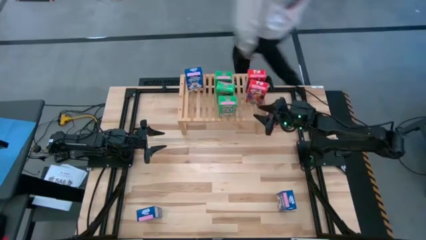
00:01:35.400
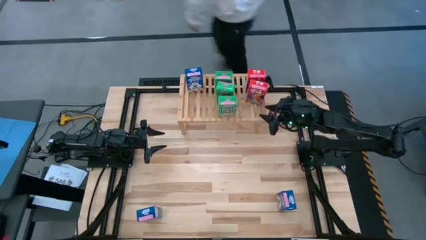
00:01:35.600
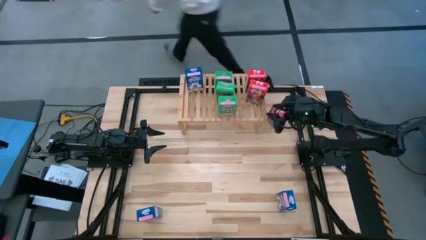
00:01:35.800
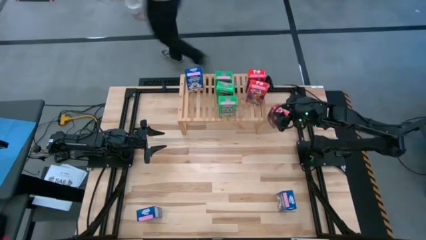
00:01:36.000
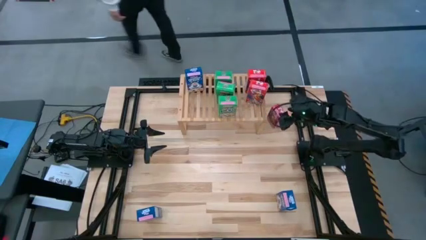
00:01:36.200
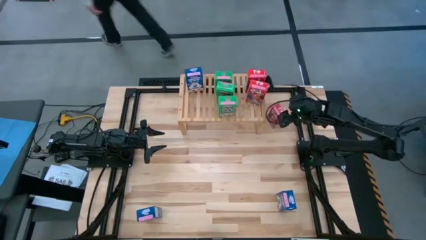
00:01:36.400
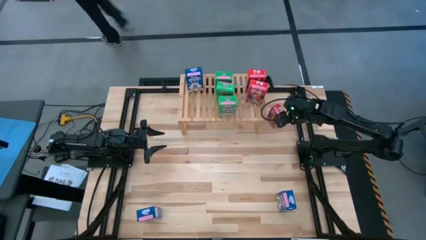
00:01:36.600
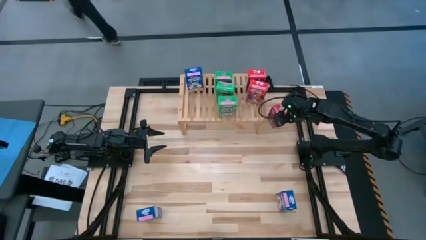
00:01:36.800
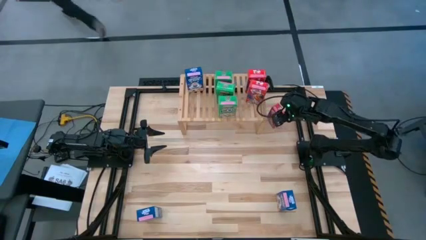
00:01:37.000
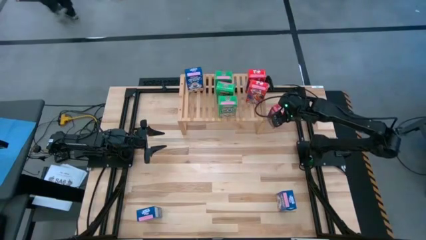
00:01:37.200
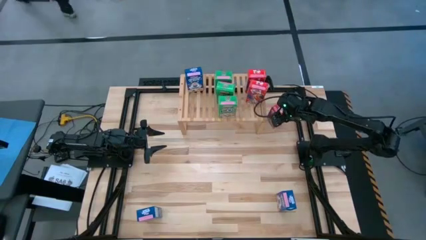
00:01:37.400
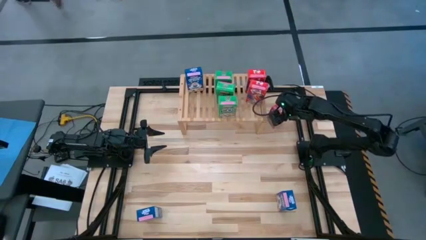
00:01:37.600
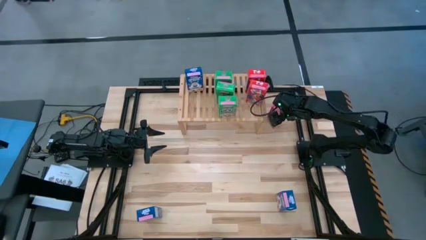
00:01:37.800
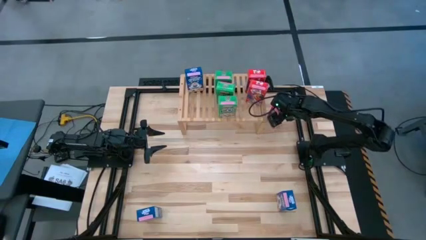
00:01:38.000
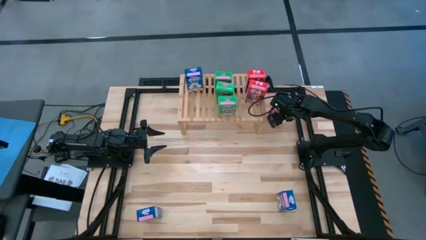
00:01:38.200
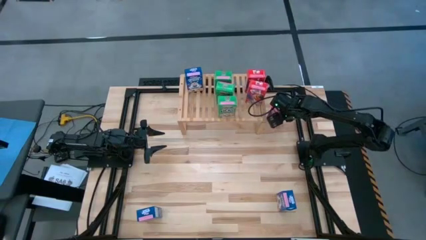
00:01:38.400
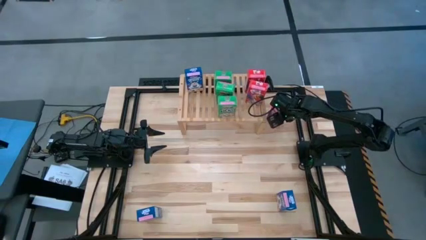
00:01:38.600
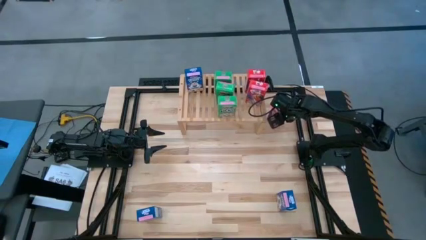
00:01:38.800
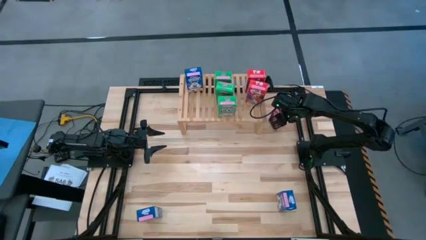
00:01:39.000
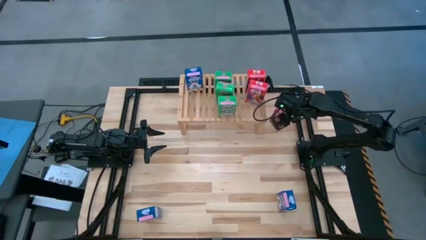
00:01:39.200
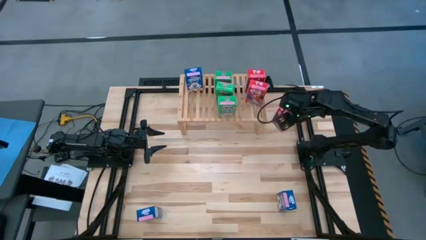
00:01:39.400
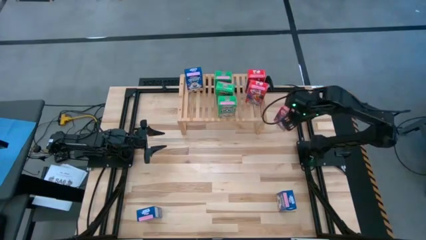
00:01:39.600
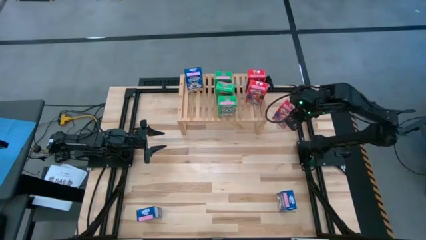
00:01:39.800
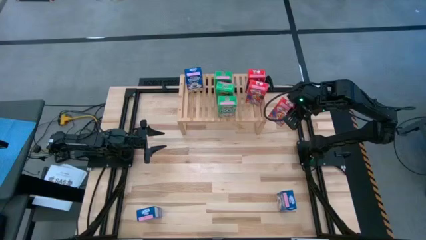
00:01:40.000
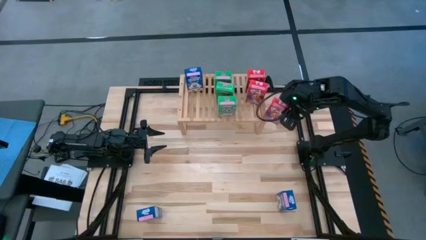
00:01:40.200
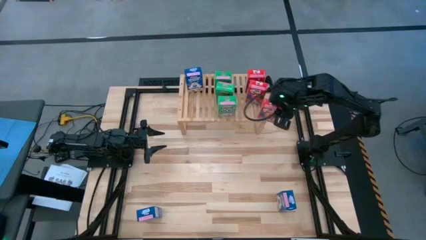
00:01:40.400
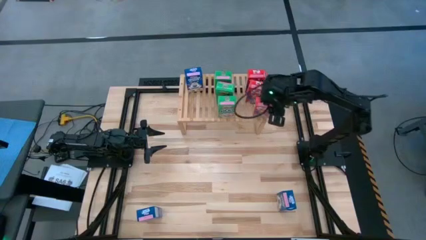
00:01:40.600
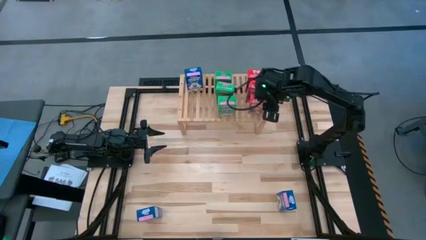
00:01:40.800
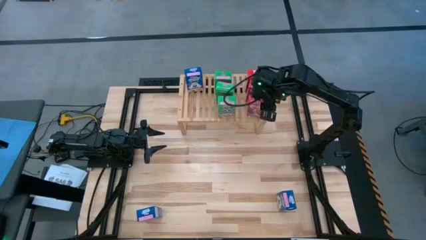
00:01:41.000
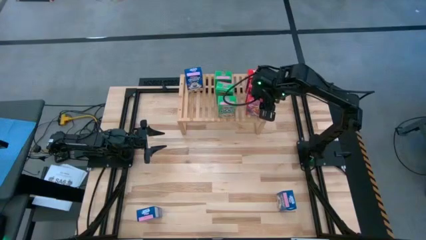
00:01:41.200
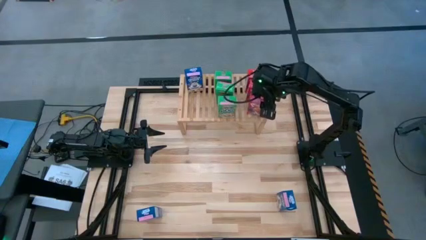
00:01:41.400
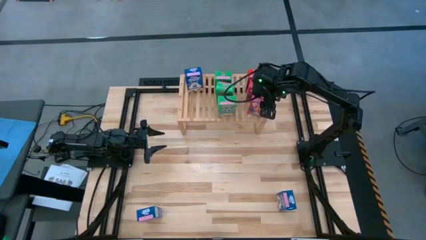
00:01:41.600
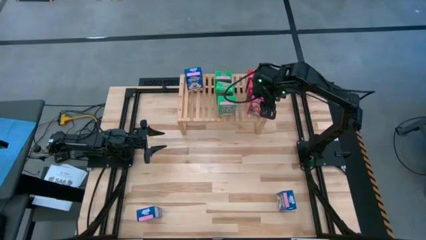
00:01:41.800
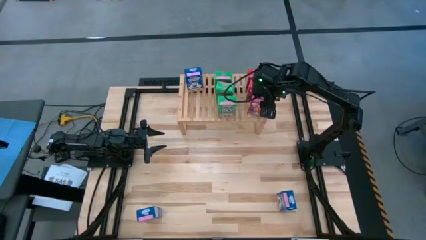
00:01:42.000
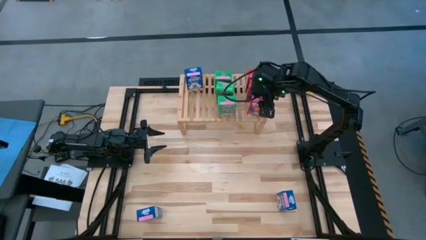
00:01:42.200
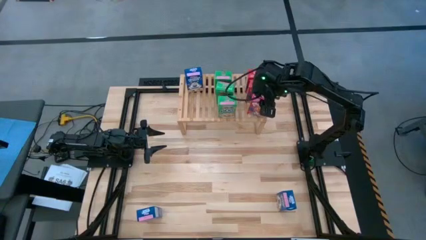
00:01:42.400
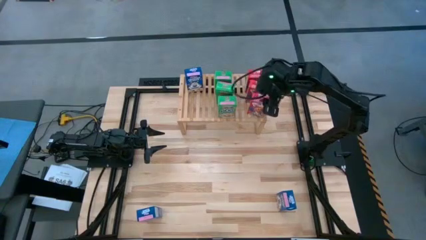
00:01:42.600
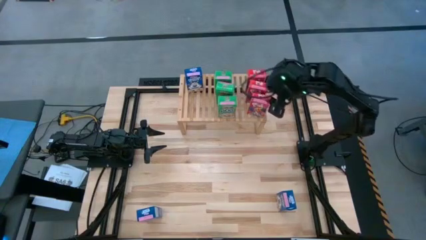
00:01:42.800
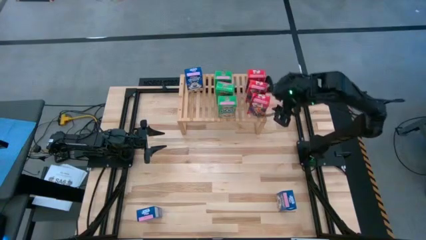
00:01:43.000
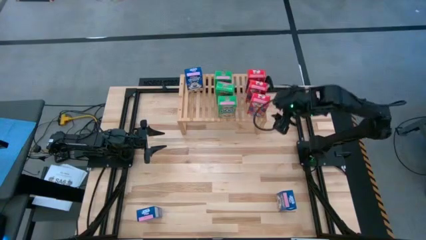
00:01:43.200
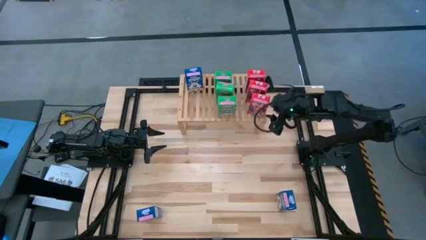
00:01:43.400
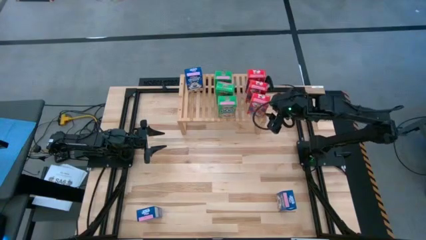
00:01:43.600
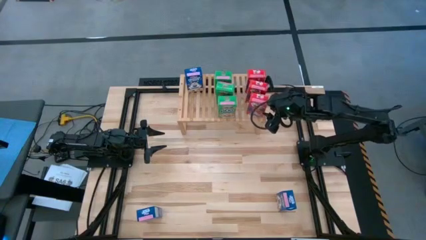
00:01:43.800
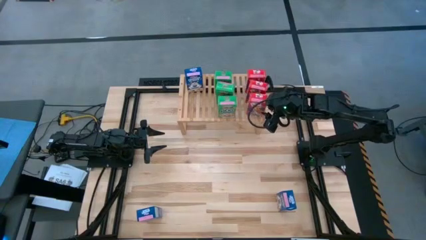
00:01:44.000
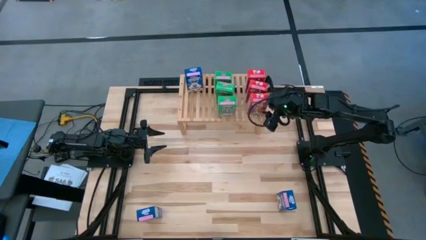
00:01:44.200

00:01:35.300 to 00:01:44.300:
Task: Stack cereal on shelf
Put the red cereal box on the shelf aligned with the other red cereal box

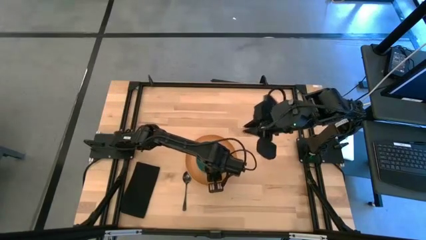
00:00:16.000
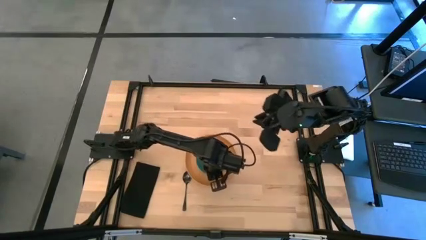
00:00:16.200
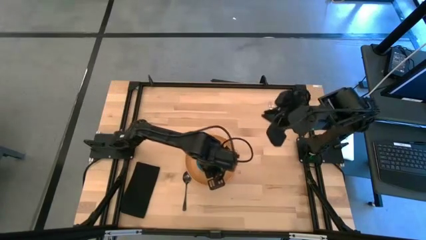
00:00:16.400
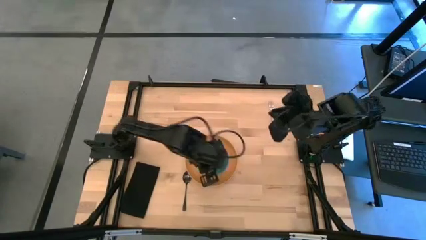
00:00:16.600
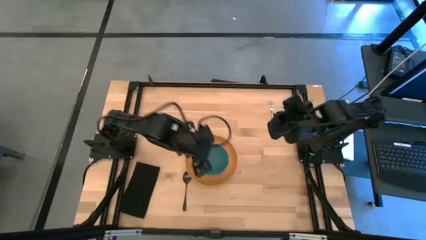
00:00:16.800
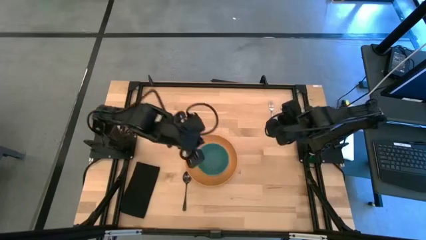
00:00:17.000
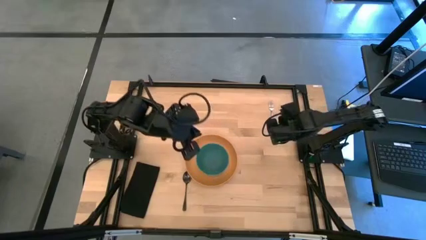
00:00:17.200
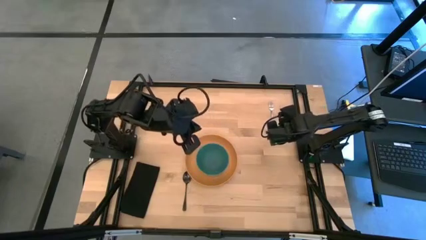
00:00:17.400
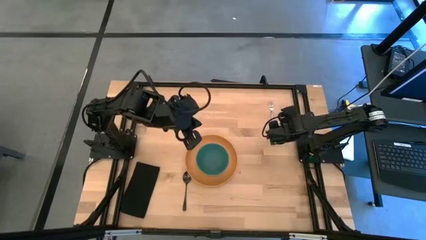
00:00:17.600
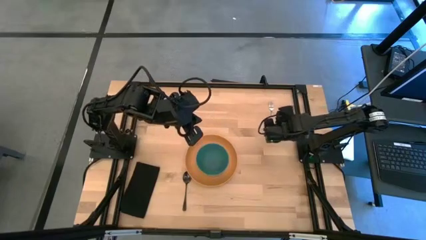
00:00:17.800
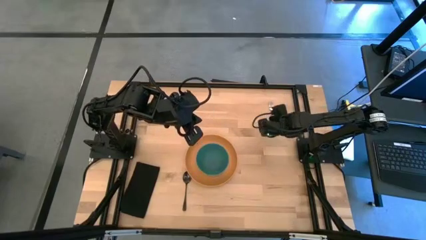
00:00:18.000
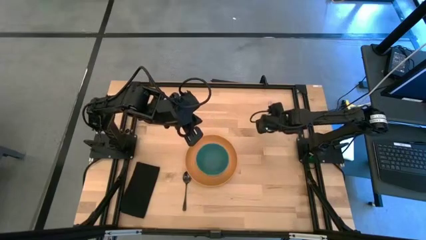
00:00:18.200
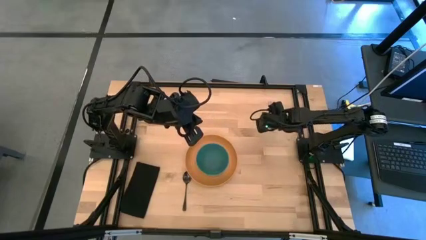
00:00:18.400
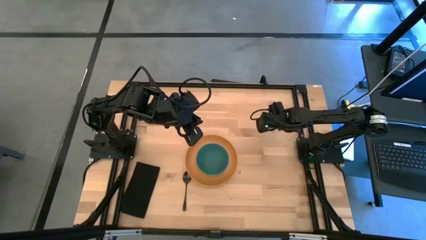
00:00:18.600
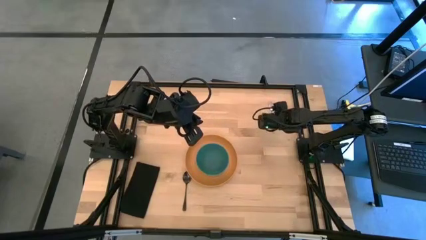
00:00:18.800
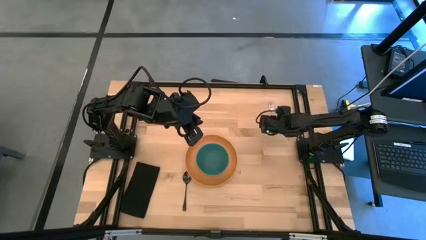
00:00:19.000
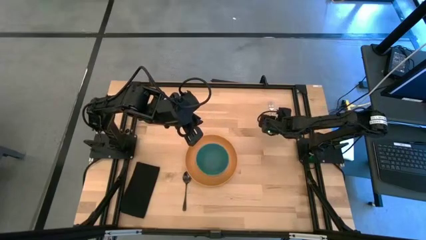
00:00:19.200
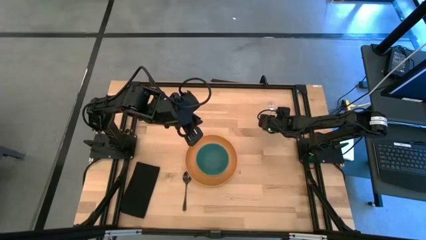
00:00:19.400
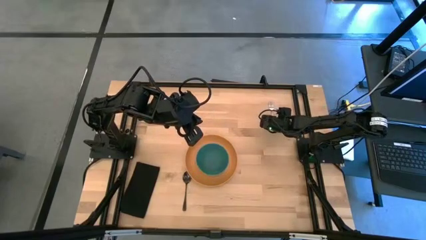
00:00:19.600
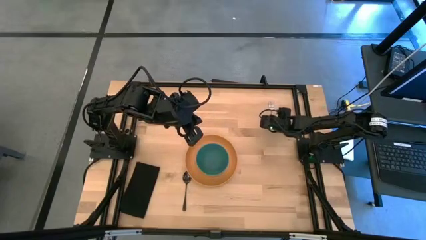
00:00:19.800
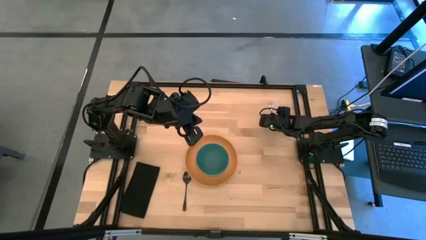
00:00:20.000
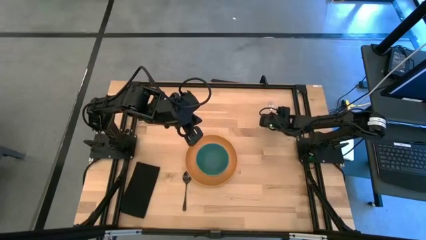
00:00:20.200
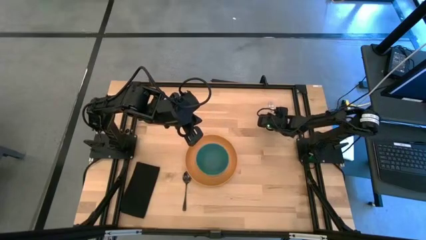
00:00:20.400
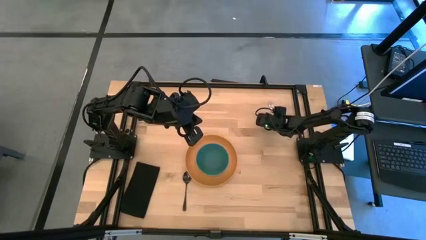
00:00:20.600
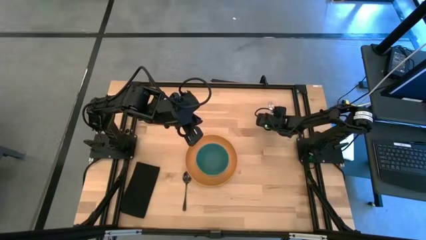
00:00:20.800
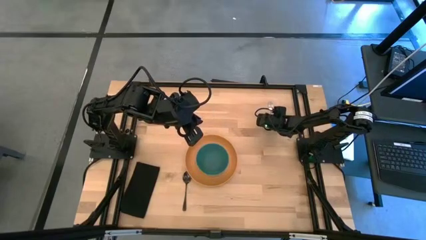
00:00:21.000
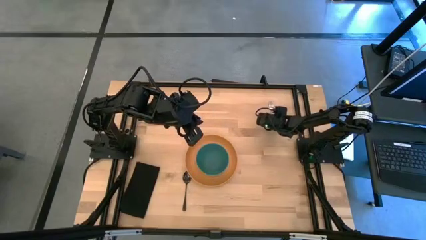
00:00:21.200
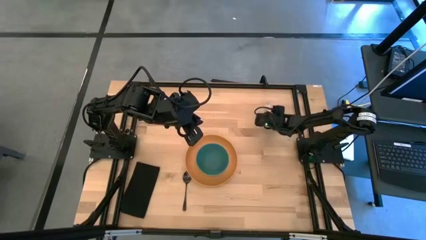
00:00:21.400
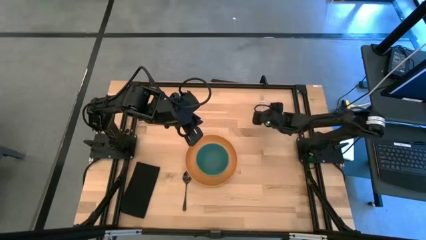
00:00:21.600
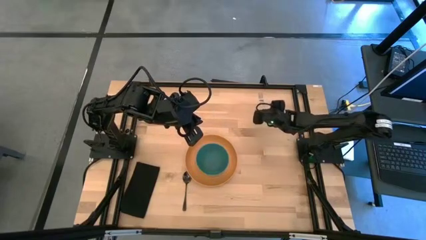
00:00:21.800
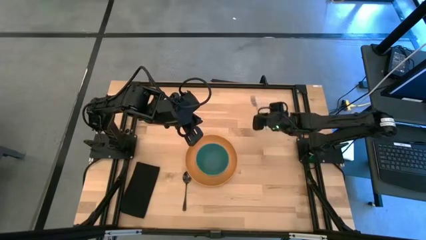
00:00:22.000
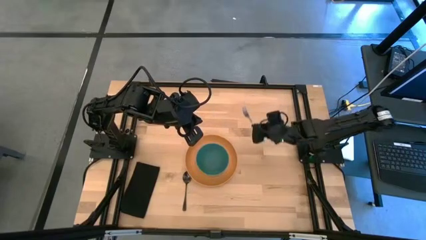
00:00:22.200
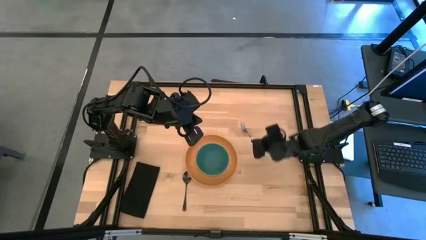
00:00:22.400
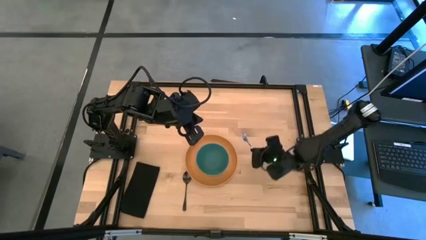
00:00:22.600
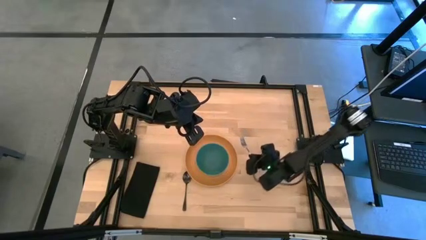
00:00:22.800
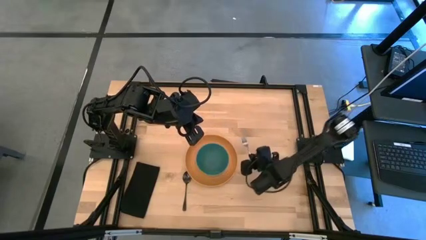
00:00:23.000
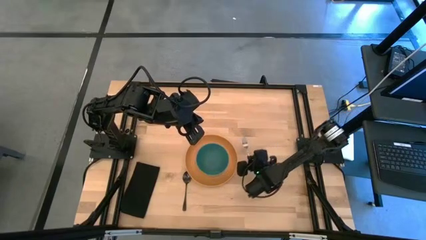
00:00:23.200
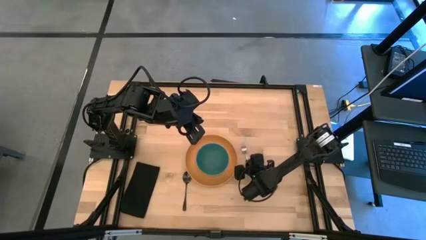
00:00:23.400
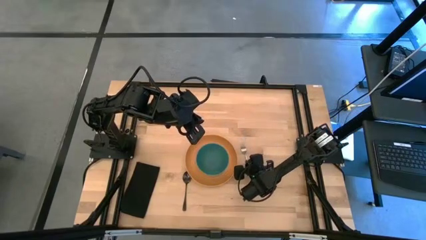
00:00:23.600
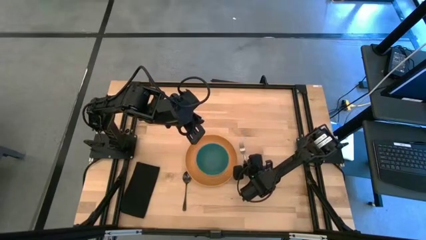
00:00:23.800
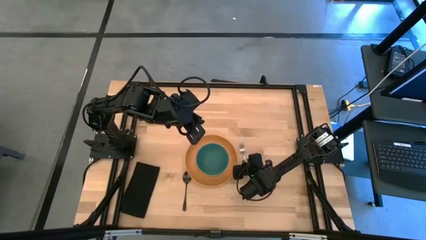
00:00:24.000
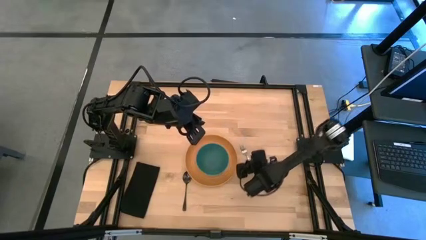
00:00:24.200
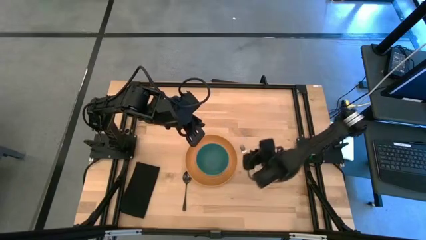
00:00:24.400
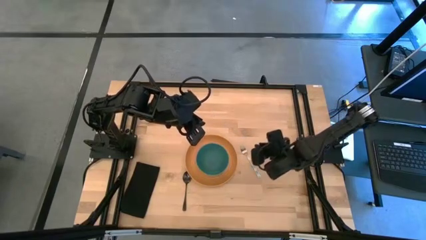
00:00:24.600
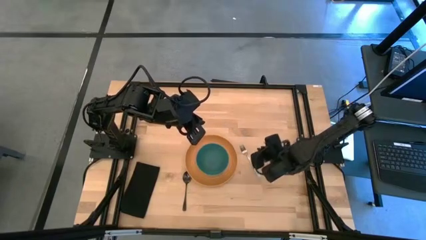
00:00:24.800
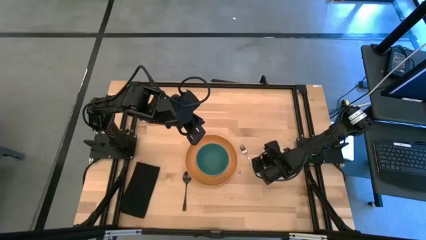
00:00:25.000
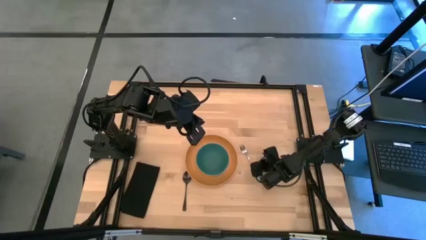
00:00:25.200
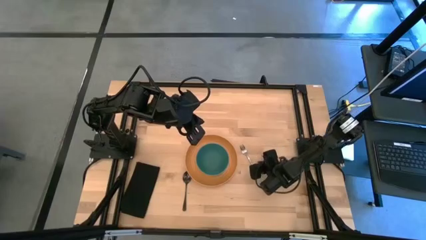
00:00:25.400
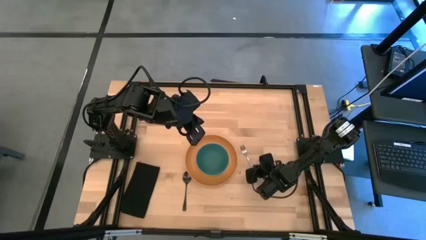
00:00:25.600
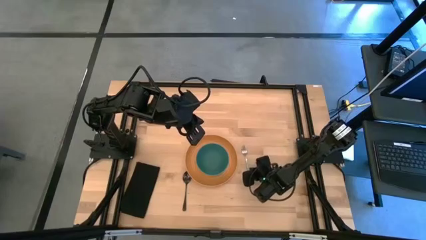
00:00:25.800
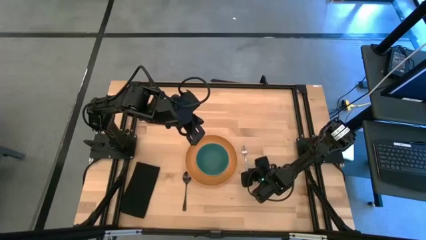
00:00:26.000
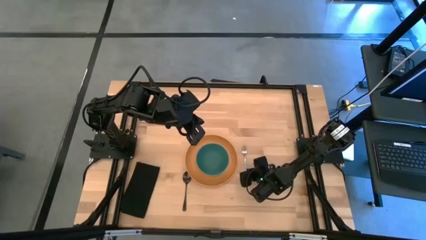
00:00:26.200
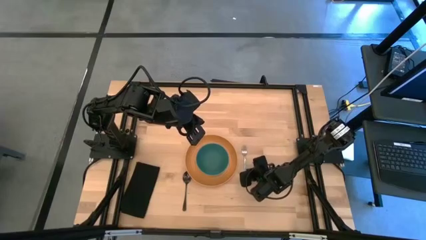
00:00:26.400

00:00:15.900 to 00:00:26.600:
Task: Set table place
Put the blue fork to the right of the orange plate
